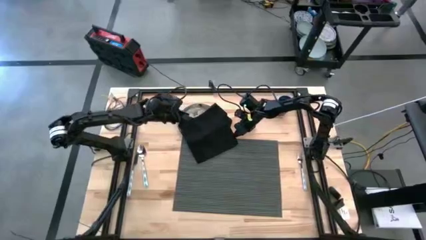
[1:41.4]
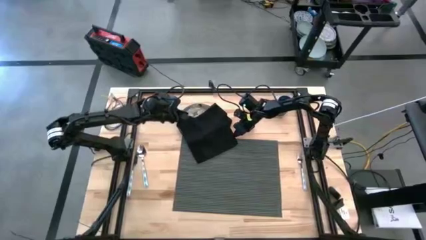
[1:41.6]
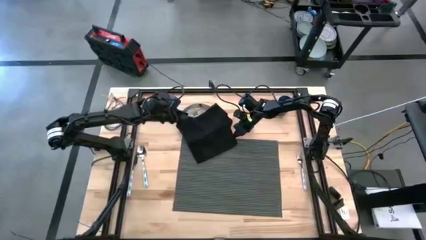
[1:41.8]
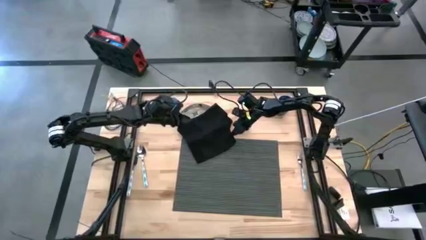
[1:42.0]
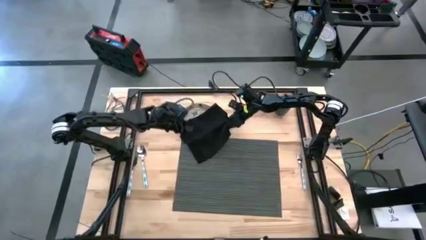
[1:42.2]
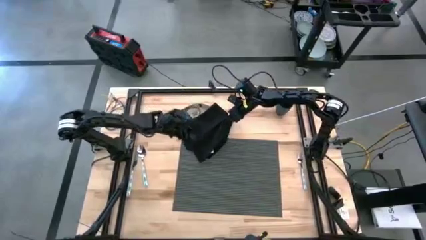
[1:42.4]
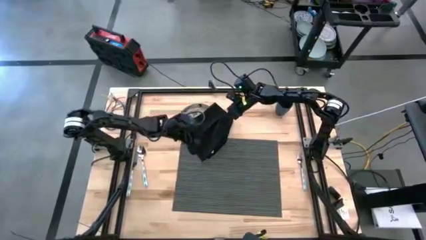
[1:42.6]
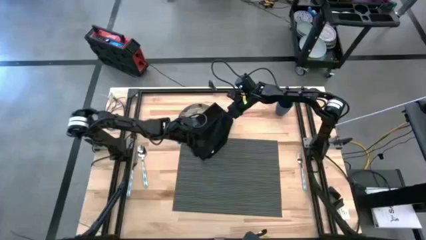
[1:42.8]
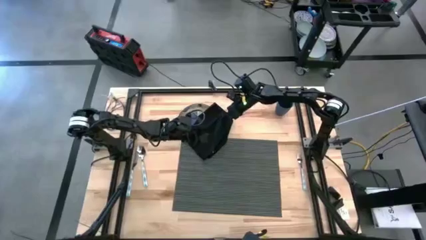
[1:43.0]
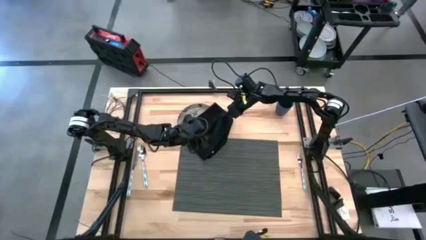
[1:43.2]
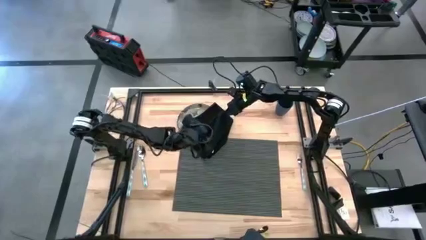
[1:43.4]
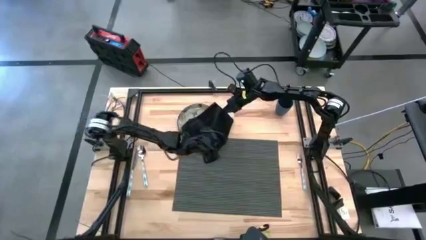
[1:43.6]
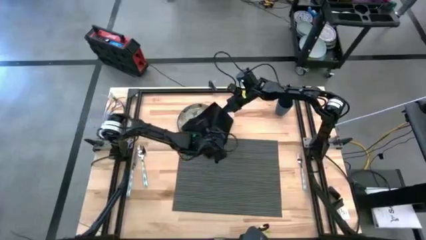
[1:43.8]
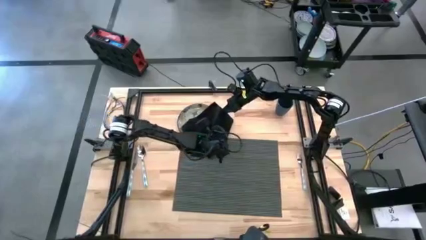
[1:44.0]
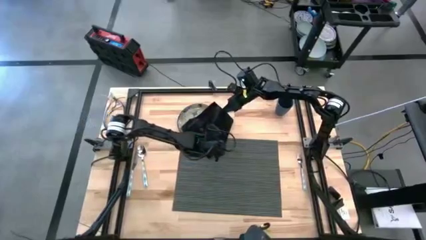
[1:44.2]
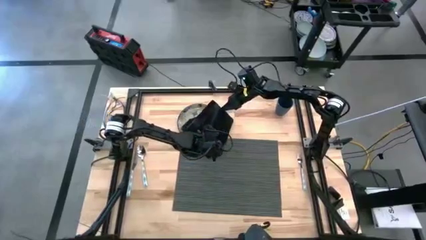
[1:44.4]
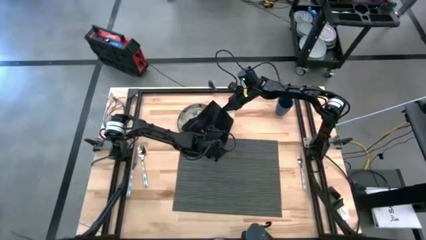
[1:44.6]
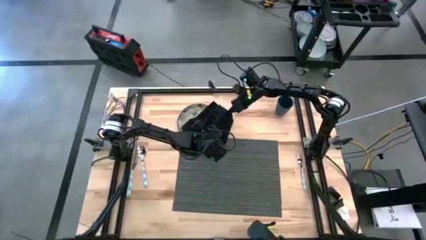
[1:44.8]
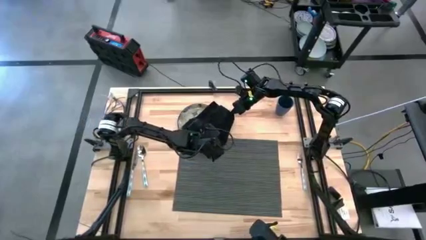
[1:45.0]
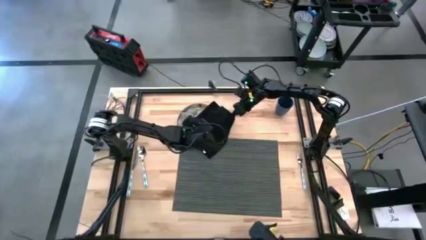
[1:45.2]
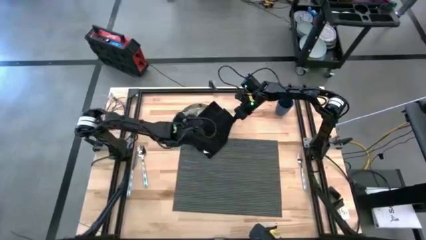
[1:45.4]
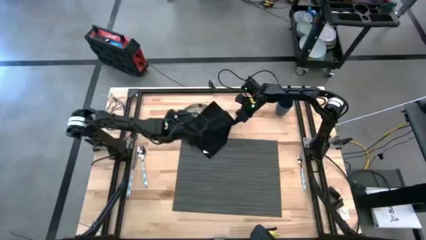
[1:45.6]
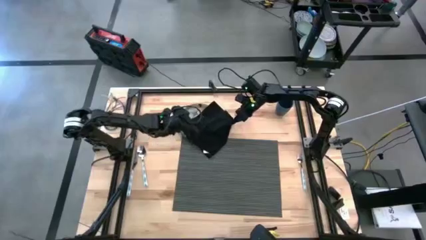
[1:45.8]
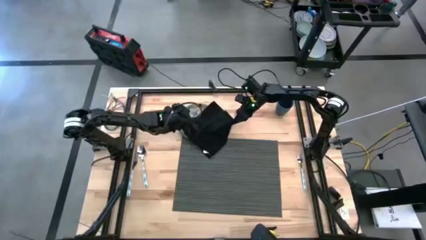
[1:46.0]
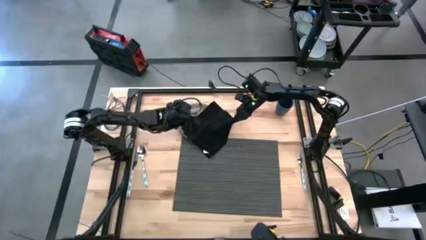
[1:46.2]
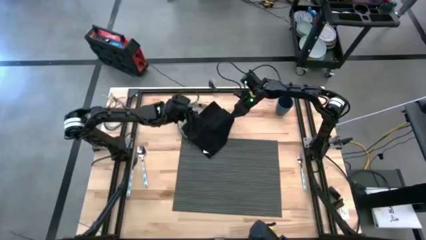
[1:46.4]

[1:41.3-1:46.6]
Task: Set table place
Fold the black napkin

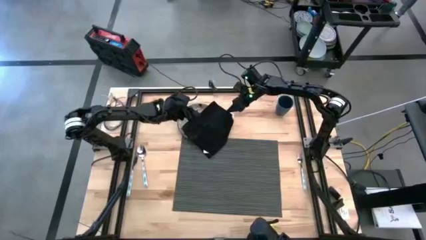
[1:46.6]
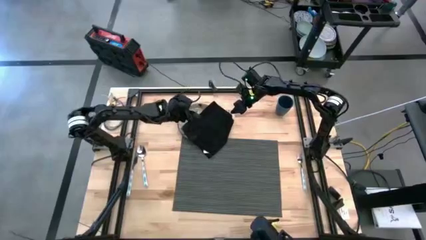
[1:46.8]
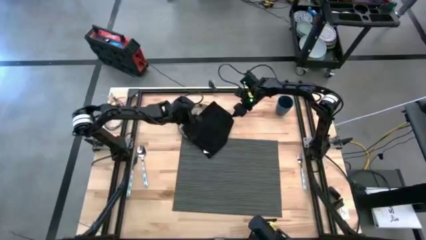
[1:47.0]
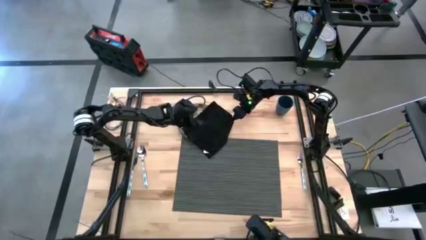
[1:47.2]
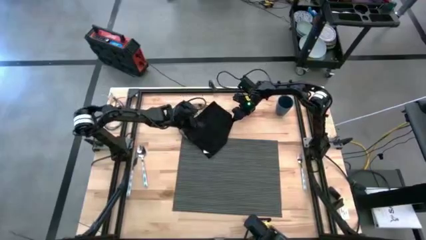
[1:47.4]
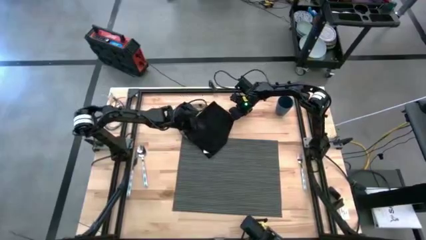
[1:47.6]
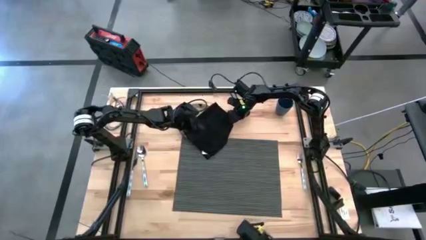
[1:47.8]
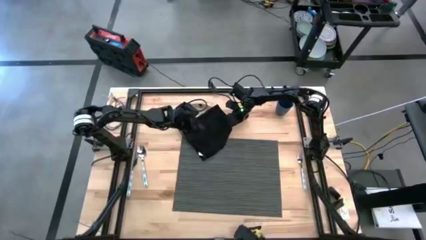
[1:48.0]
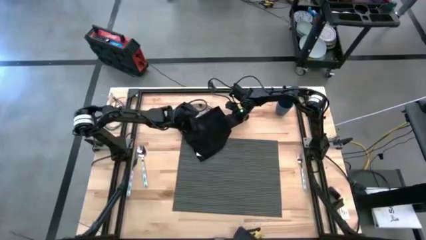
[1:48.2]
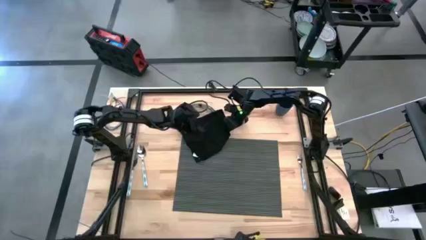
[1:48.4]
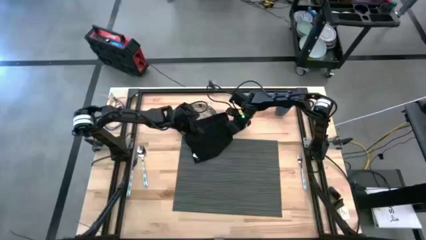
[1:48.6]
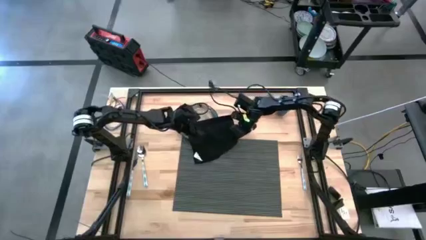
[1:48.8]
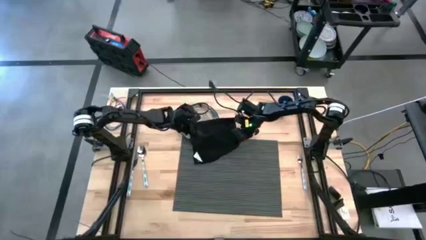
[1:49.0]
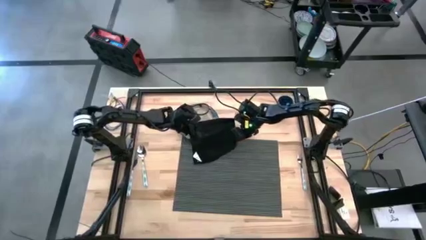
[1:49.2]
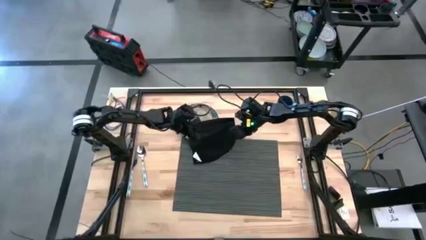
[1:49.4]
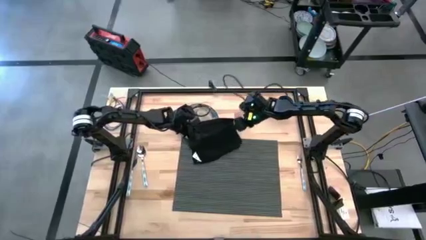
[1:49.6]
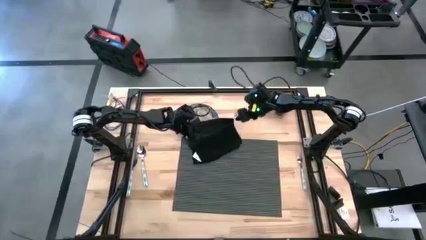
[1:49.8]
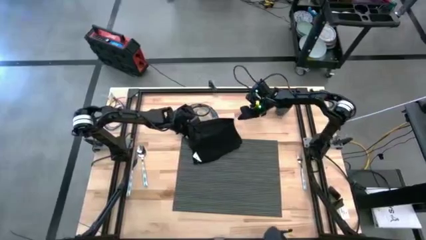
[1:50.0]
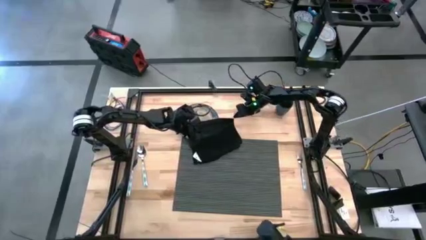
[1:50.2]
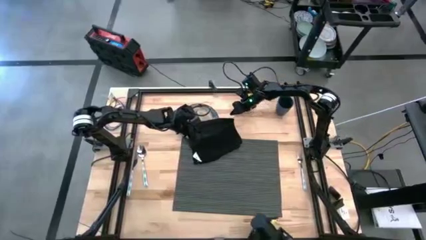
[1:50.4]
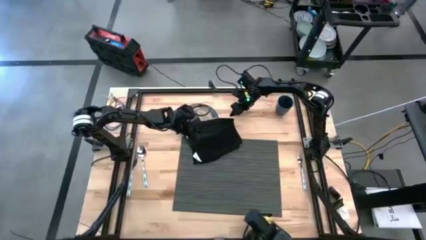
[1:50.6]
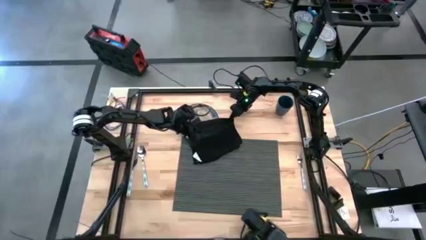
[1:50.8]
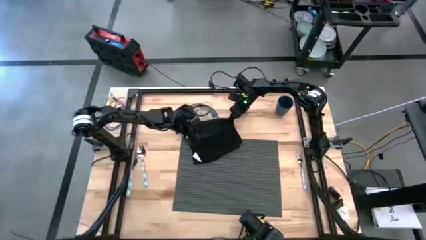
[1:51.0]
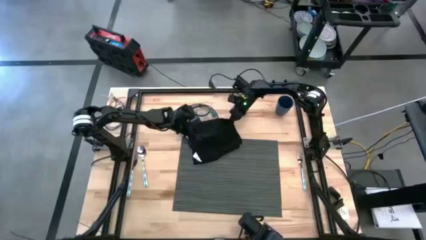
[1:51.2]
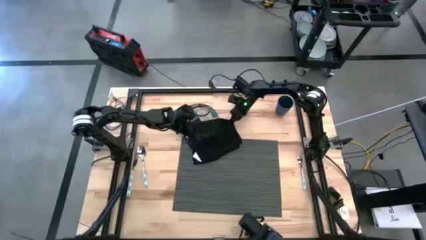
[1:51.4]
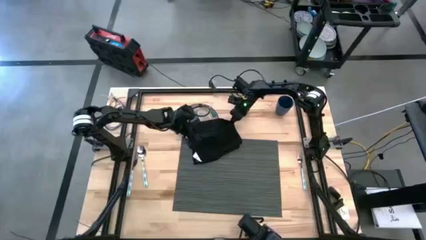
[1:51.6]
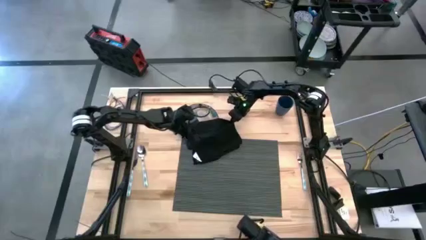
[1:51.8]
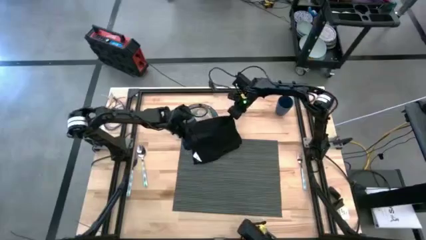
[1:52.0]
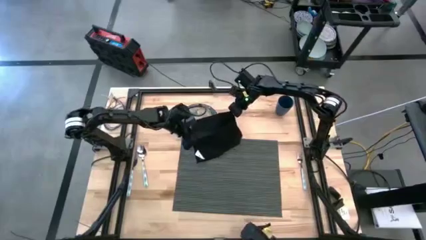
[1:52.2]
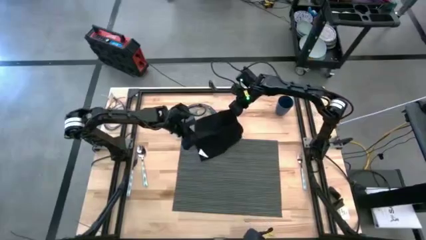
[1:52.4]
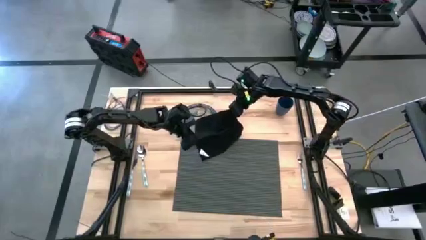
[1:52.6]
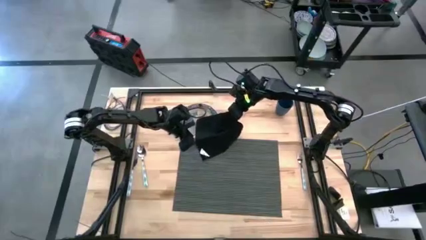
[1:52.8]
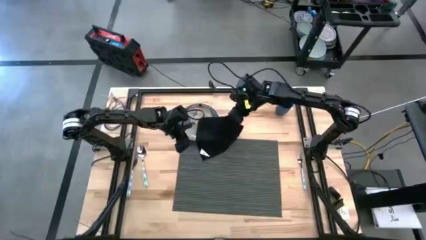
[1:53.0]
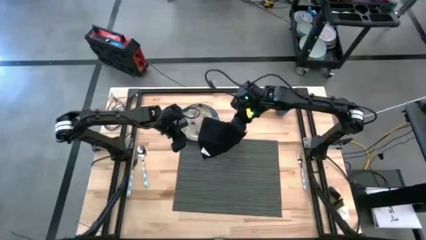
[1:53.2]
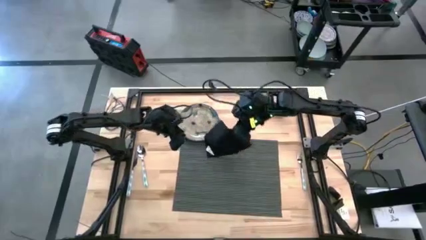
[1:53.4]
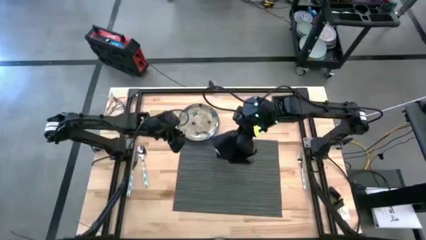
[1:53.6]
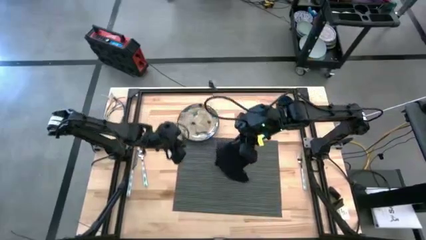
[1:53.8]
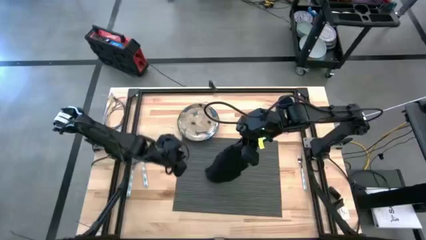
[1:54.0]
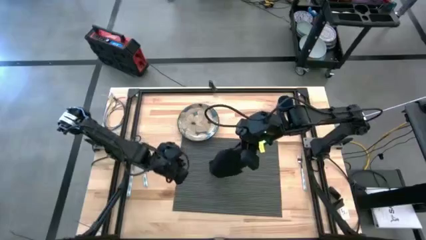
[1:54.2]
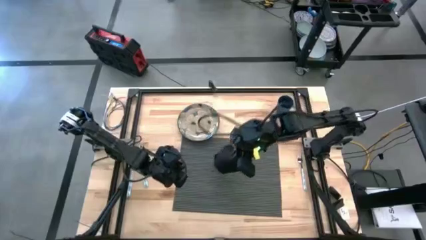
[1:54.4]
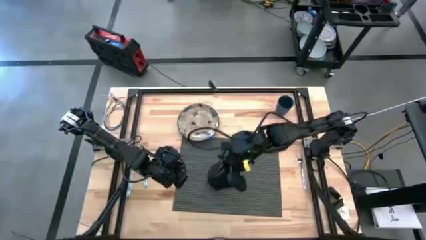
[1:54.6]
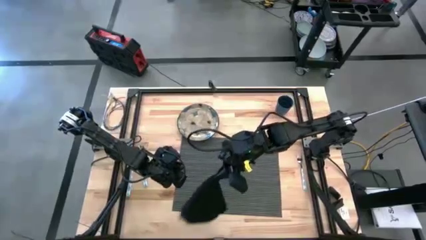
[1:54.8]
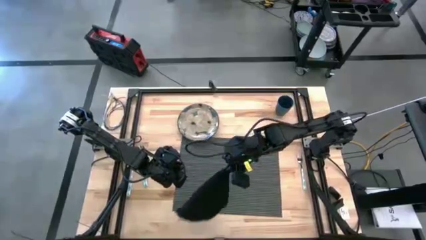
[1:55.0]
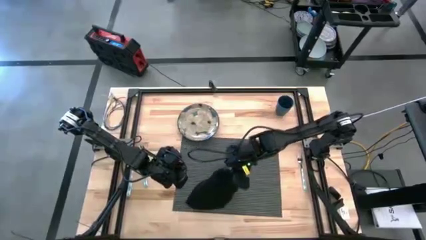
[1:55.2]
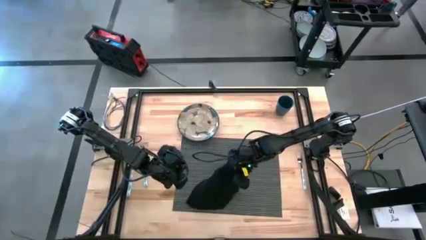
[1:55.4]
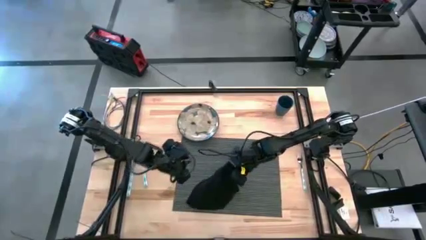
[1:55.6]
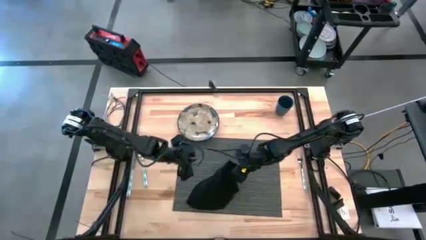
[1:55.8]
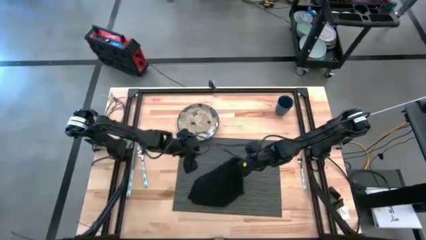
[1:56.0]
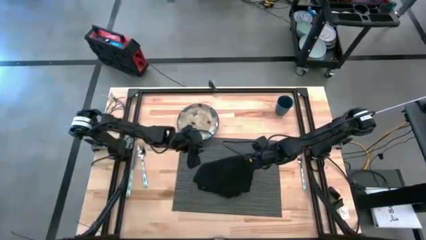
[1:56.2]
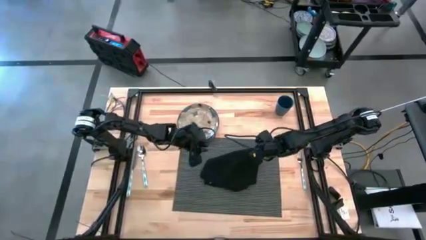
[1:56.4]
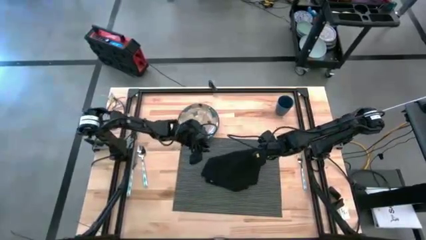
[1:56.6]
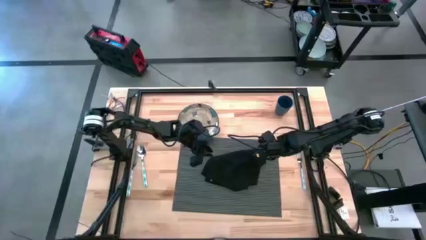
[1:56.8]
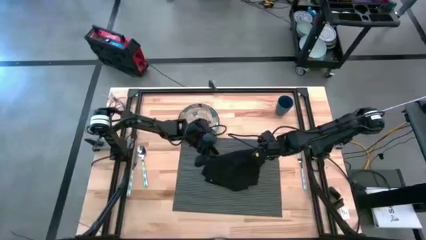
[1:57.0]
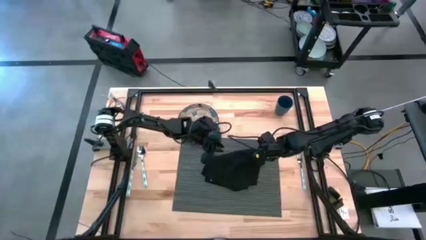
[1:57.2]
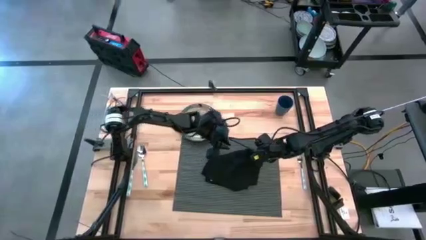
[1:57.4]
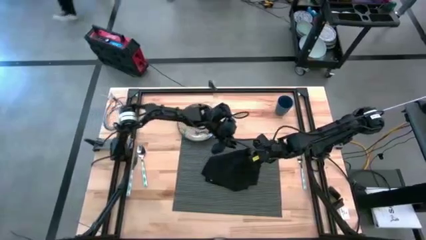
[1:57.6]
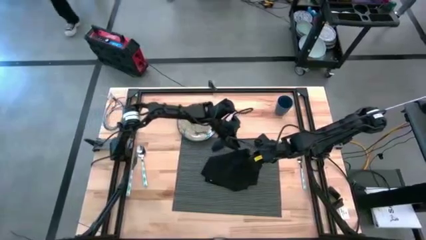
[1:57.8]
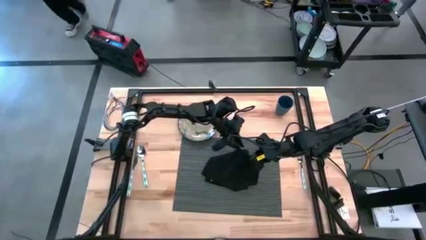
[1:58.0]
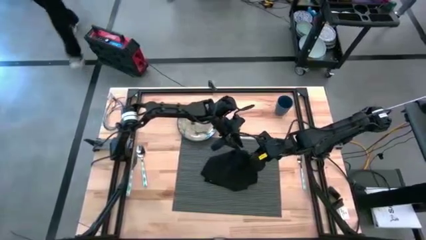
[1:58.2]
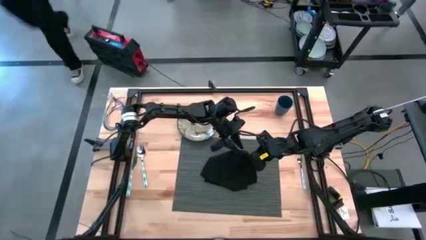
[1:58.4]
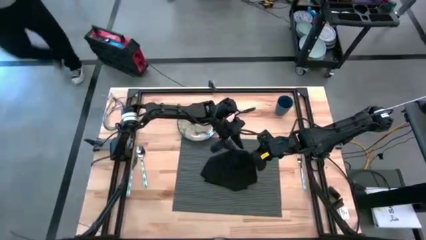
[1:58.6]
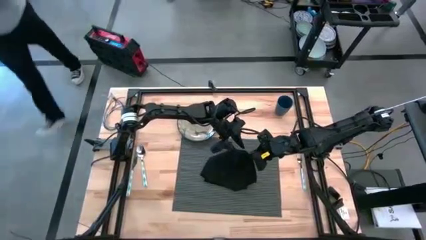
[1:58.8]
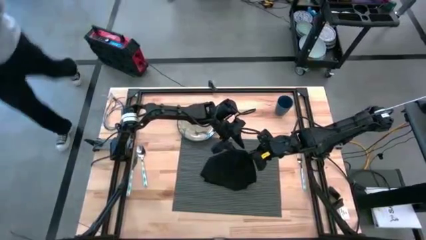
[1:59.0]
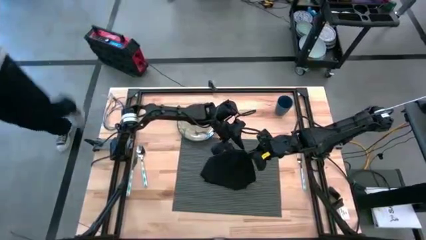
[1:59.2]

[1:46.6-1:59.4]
Fold the black napkin
